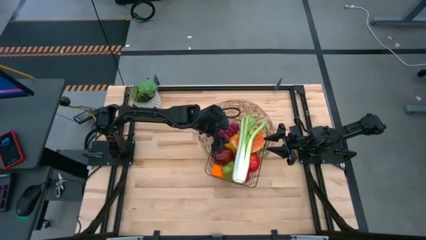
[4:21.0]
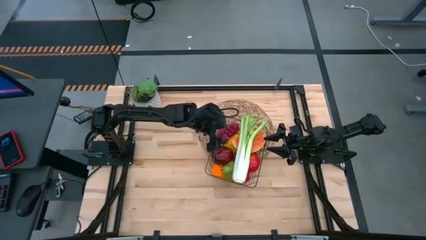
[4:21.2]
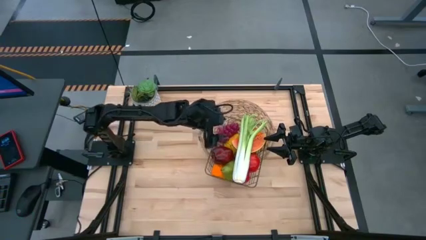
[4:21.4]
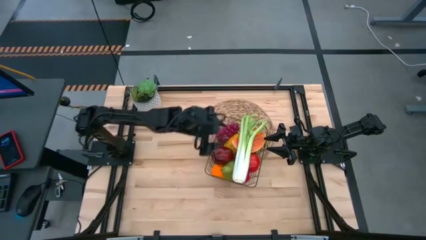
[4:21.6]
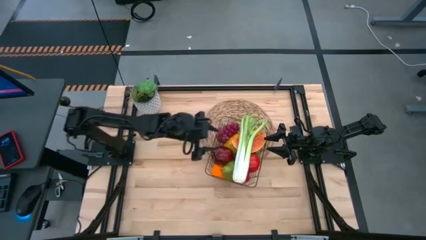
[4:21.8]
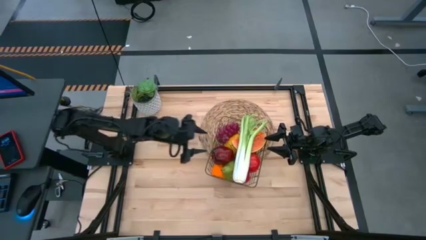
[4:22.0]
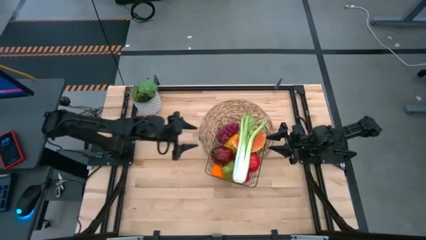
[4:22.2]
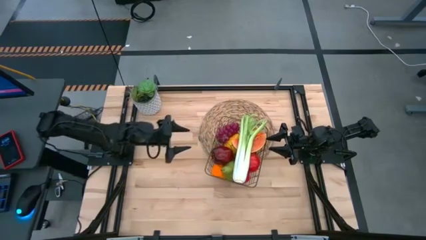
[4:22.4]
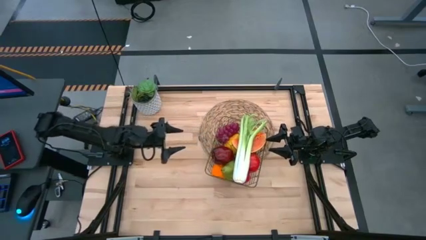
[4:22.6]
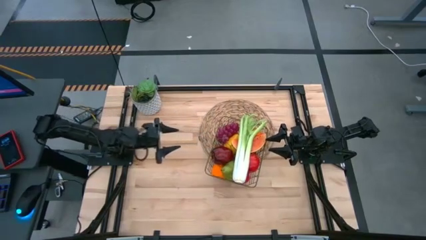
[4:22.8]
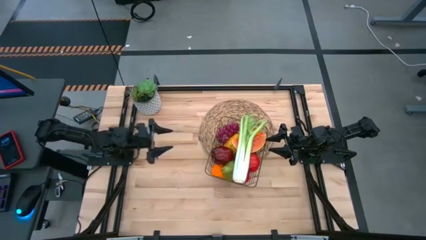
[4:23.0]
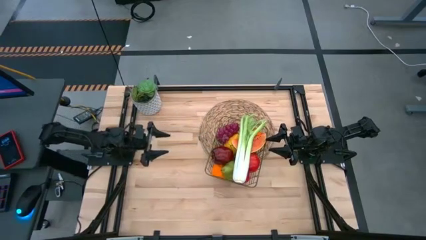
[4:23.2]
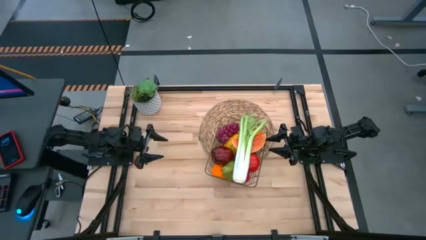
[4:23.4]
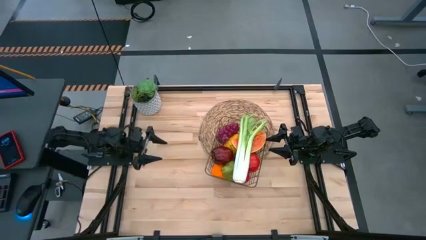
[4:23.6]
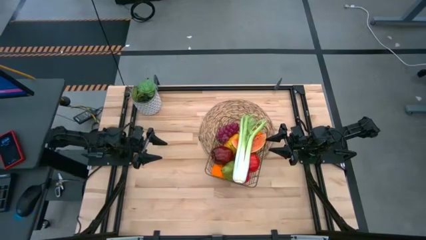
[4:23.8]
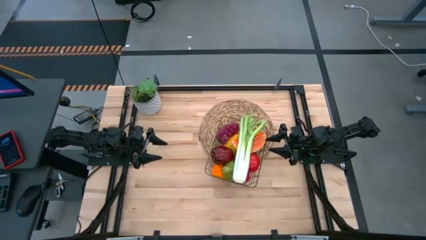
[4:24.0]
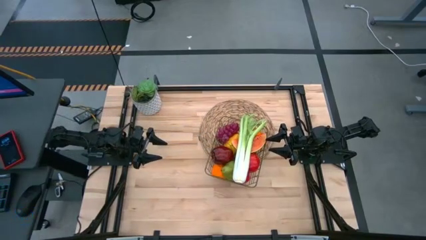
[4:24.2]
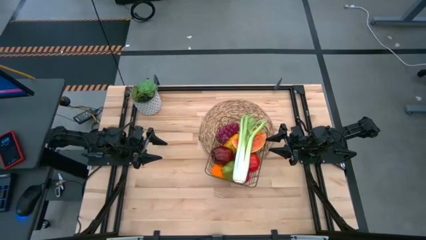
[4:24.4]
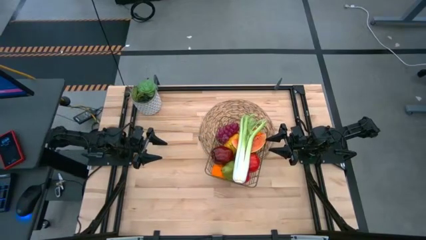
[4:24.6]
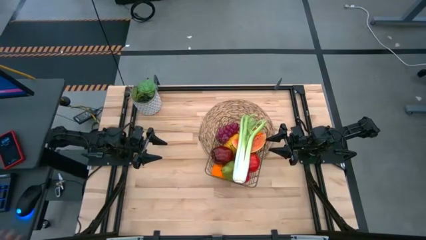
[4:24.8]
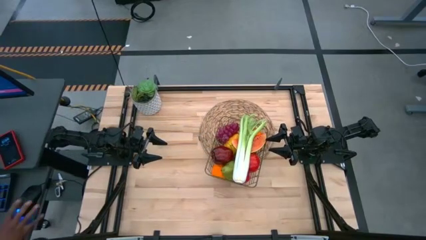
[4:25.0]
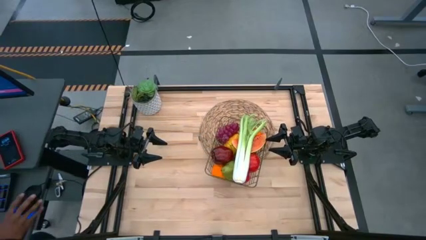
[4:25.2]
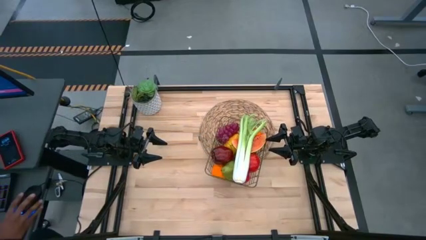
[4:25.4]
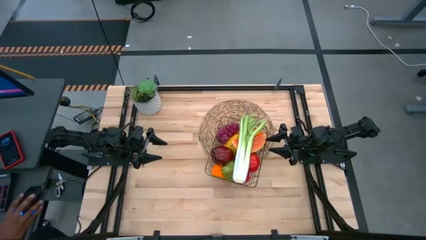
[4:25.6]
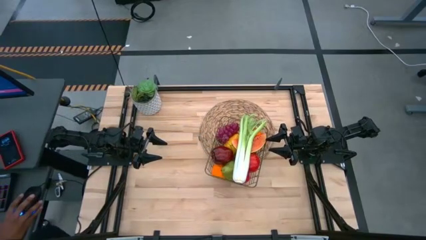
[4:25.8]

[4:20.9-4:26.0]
Task: Build produce basket
Return to Home Position

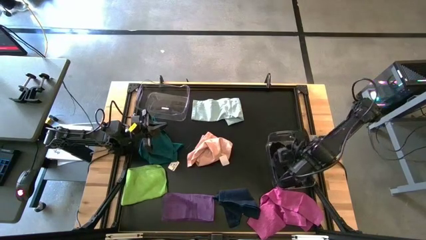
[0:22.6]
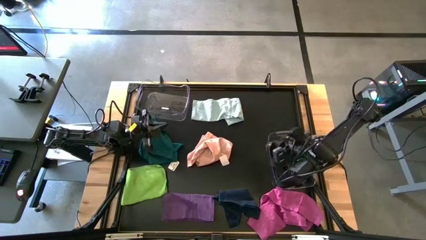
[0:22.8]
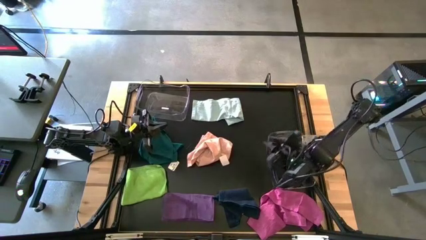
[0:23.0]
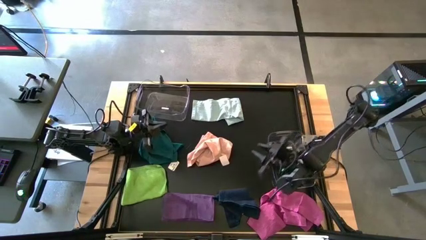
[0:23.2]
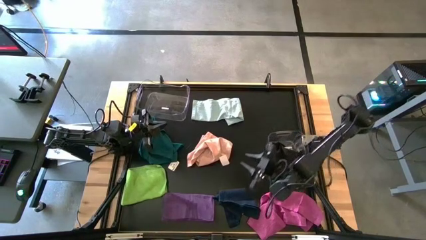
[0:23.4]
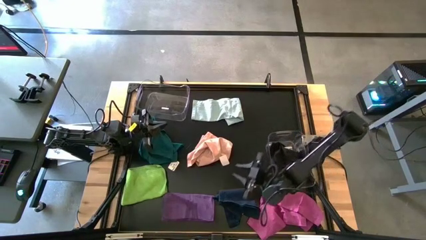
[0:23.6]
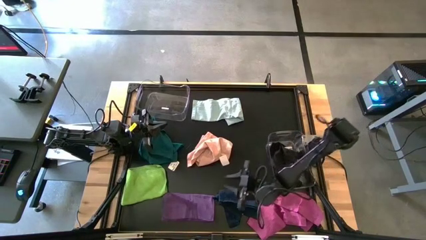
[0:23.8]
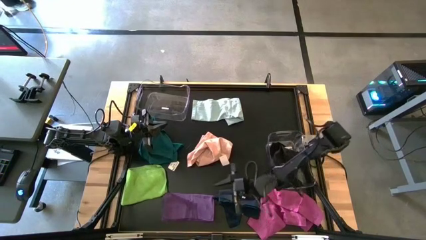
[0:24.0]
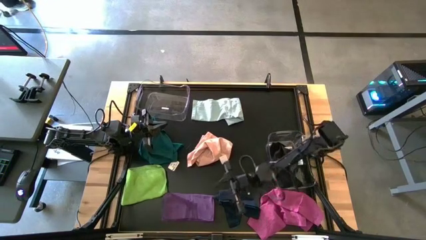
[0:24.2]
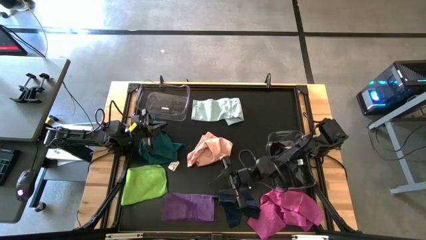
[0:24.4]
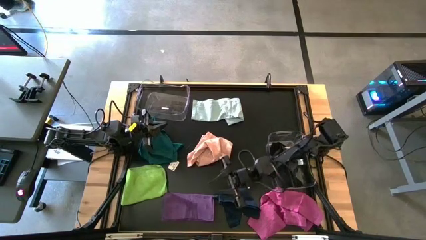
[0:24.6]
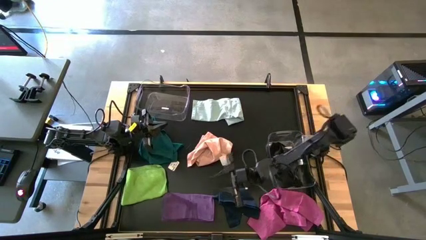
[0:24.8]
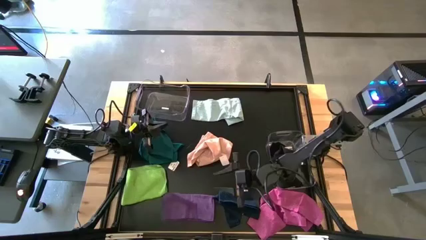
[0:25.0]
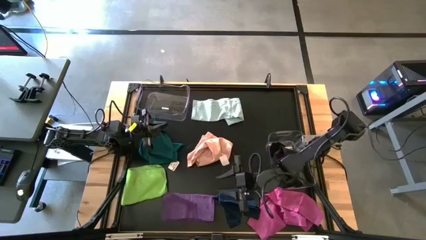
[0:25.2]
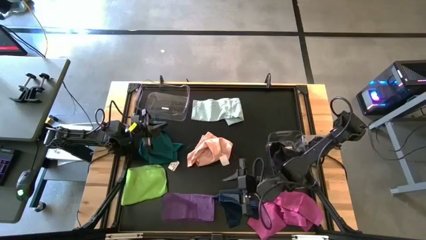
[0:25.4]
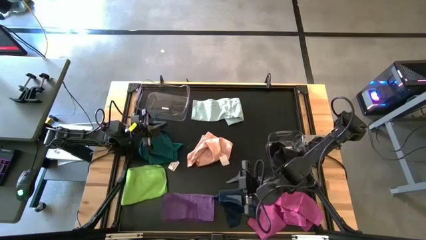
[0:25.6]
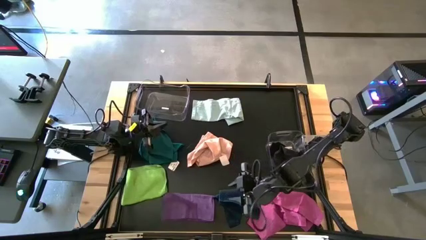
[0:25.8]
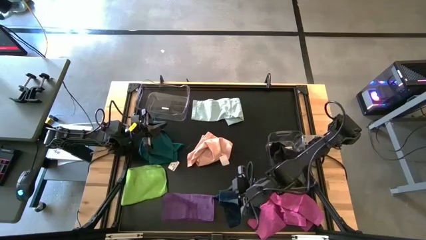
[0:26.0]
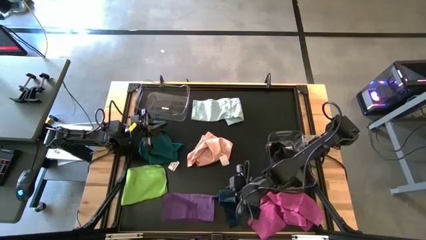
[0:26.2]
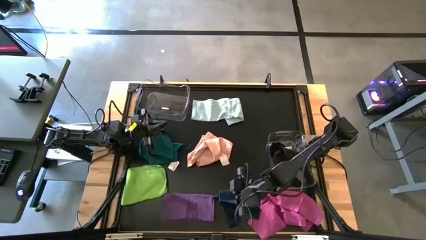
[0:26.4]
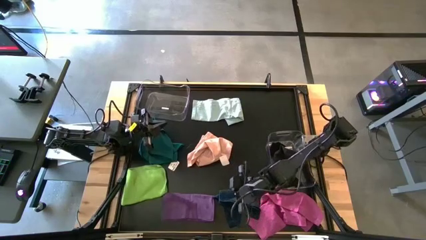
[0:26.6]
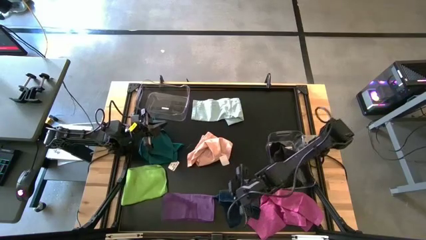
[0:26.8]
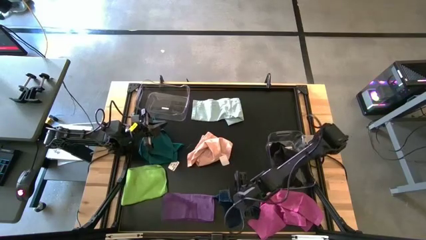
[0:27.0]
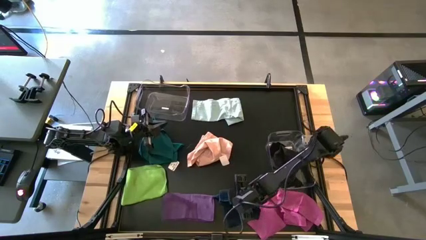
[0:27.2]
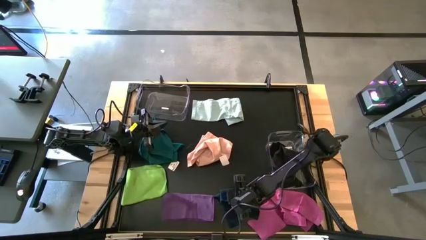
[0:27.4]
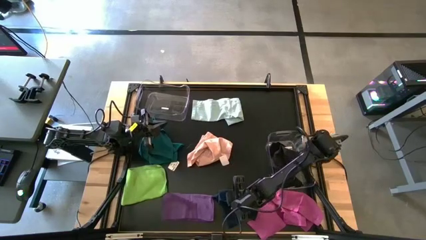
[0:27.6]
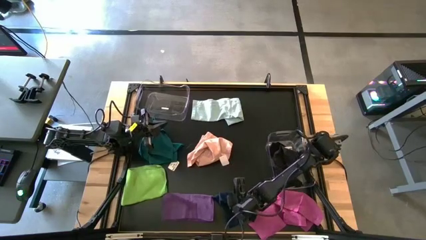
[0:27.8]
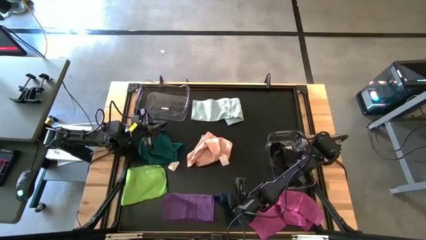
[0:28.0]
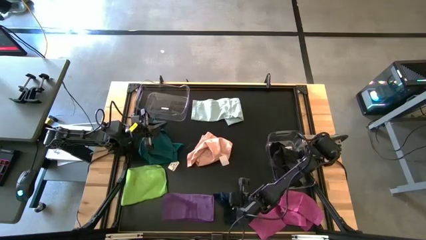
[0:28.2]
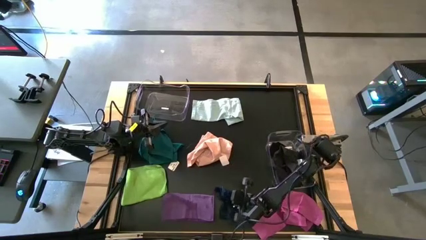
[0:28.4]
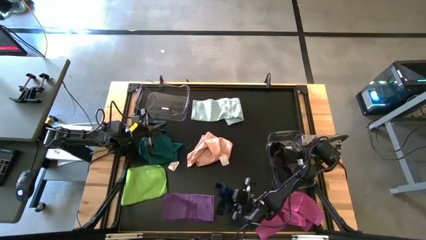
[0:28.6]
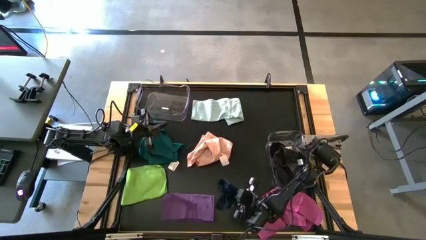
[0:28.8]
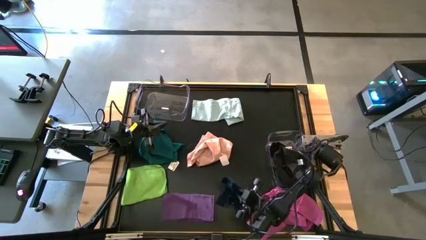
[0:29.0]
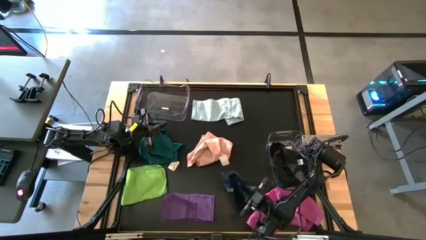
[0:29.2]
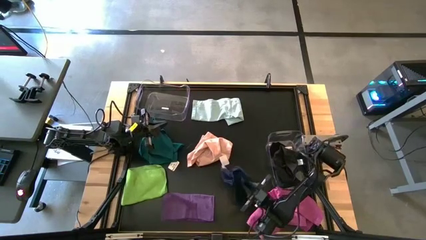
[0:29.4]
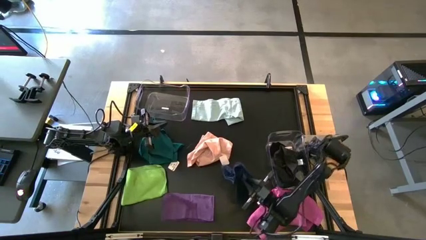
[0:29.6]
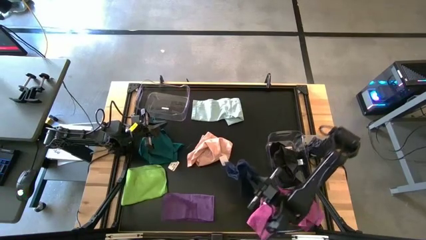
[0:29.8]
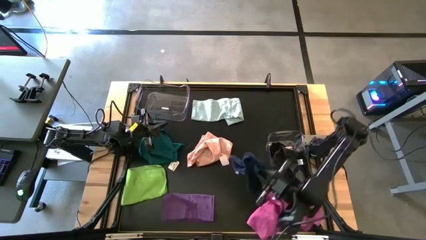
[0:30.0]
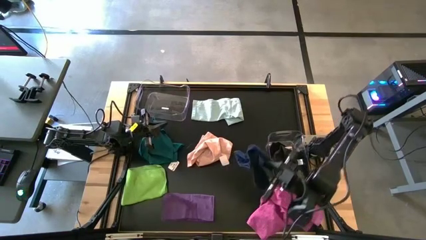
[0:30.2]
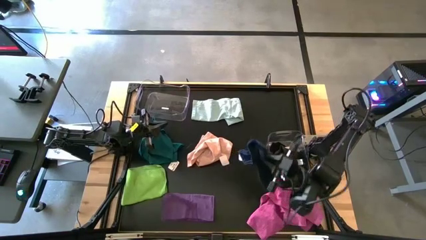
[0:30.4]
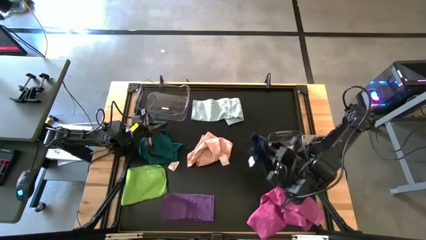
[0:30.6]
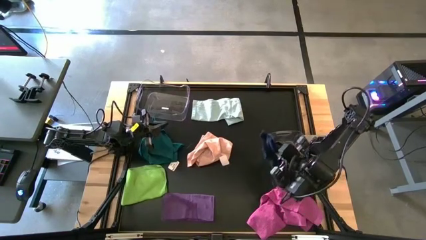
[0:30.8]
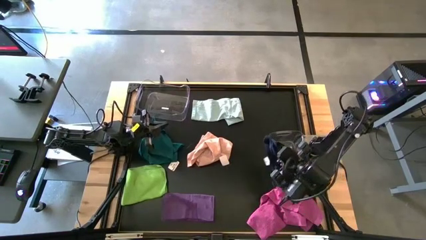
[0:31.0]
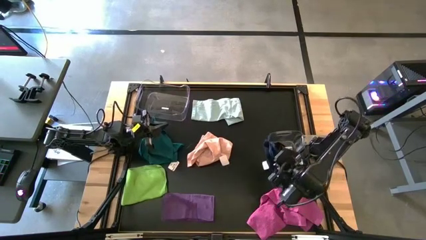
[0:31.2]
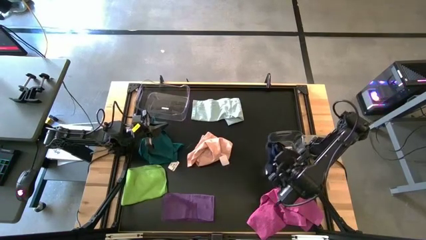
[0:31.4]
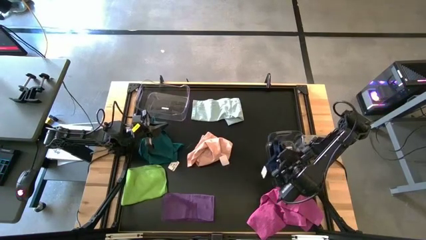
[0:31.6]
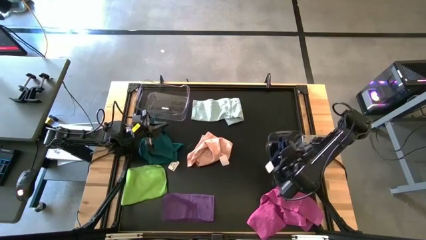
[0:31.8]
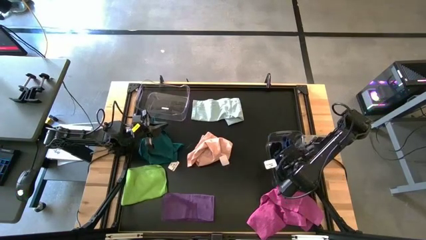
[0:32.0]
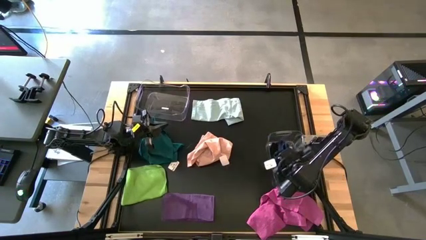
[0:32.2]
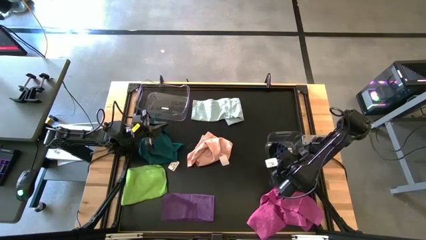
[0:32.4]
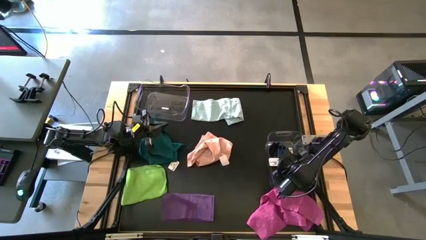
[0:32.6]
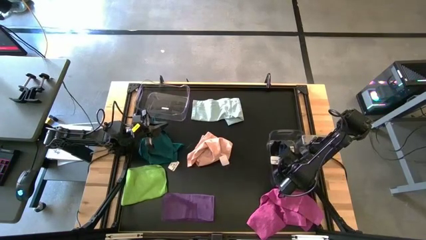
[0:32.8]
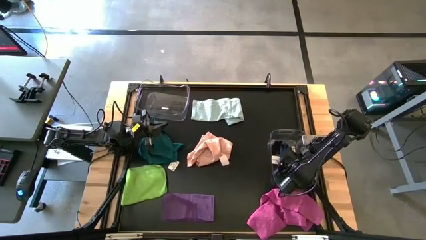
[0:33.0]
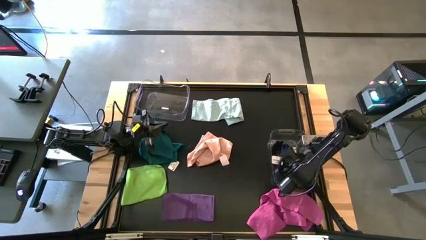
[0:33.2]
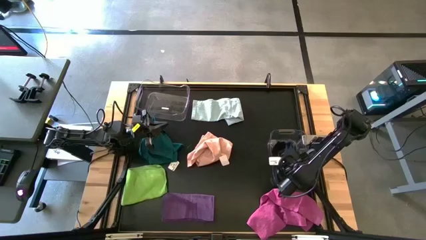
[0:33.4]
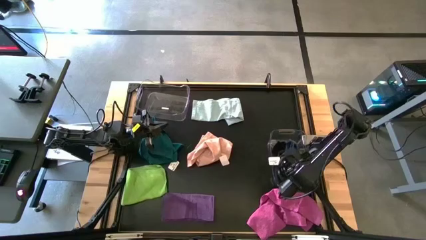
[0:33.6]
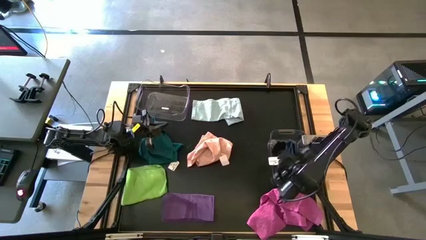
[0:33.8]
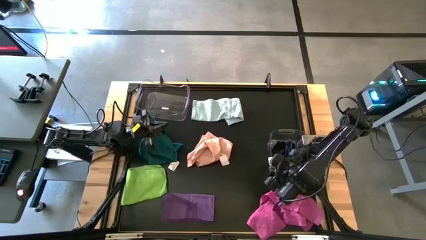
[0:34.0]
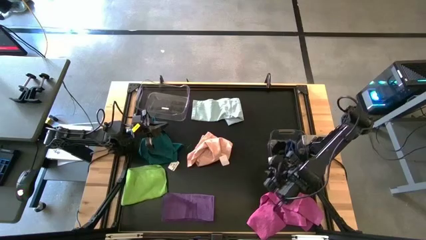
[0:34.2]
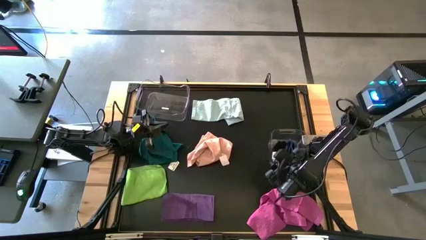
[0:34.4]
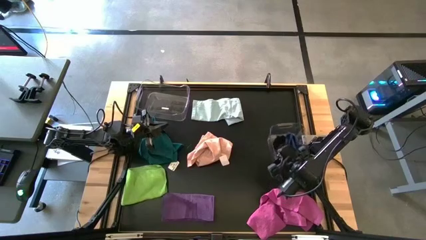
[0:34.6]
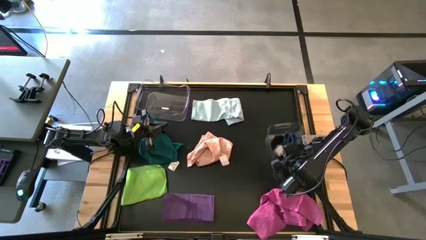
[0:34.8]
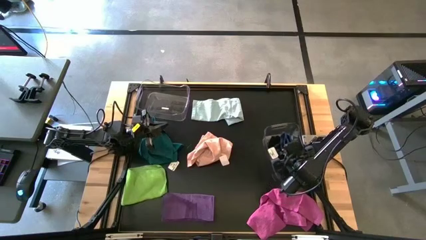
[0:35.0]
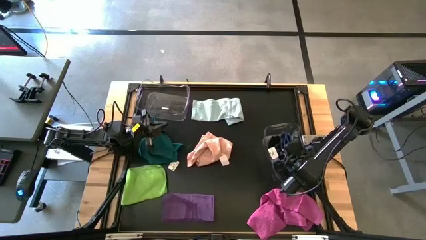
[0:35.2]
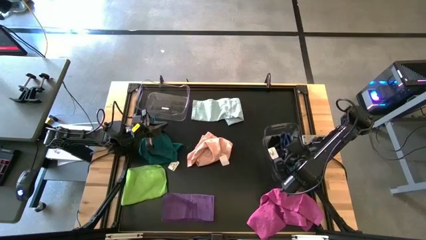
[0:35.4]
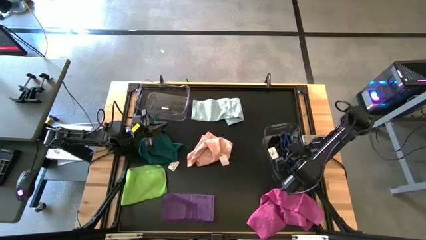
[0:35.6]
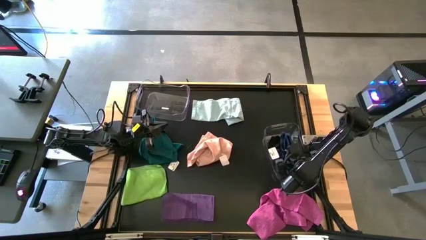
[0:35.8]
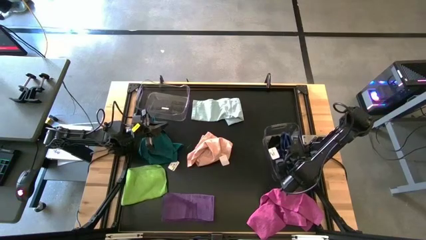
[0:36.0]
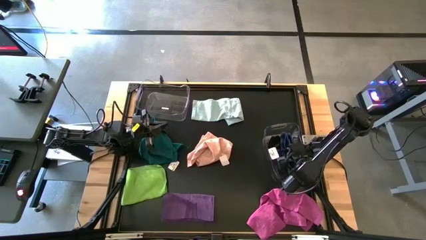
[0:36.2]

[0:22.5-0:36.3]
Task: Sort towels by color in basket
Put the dark blue into the bottom transparent bin
